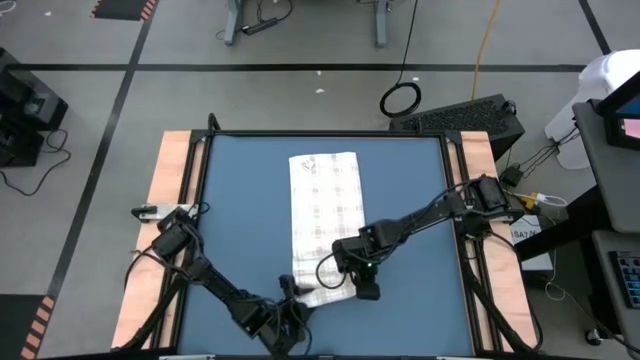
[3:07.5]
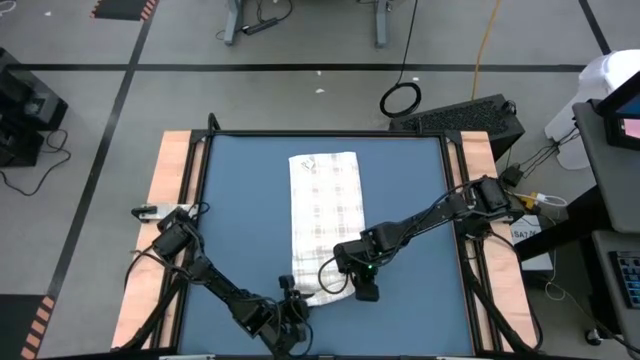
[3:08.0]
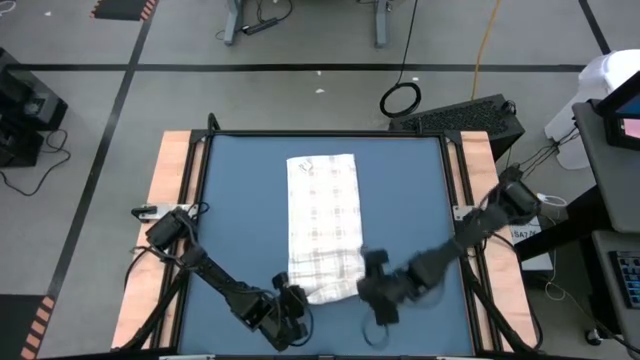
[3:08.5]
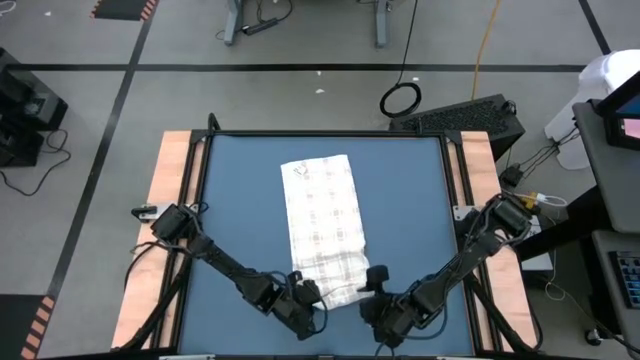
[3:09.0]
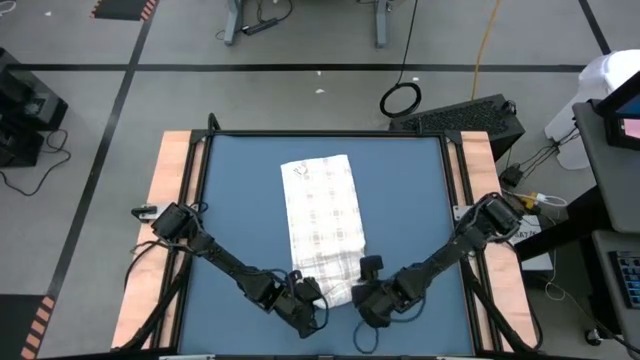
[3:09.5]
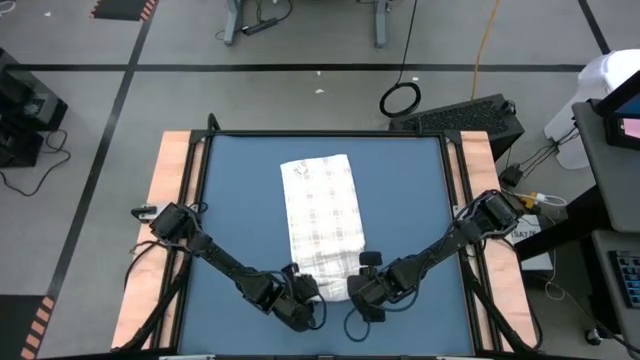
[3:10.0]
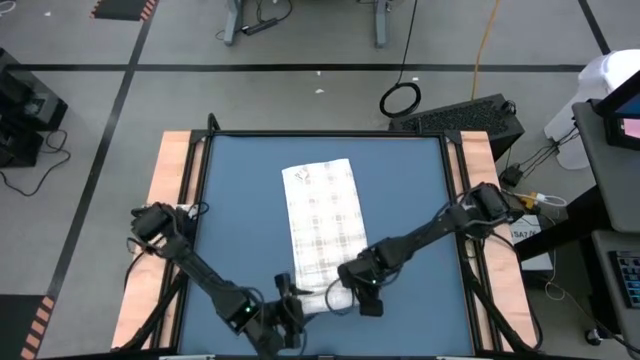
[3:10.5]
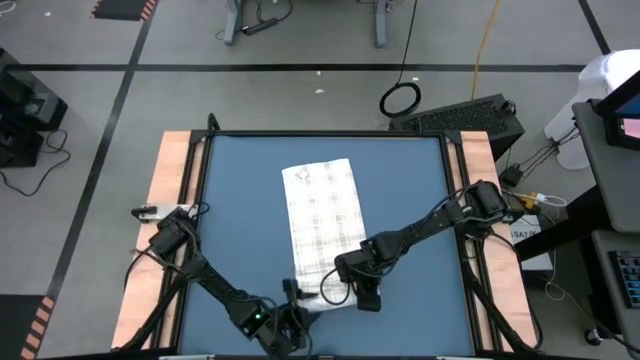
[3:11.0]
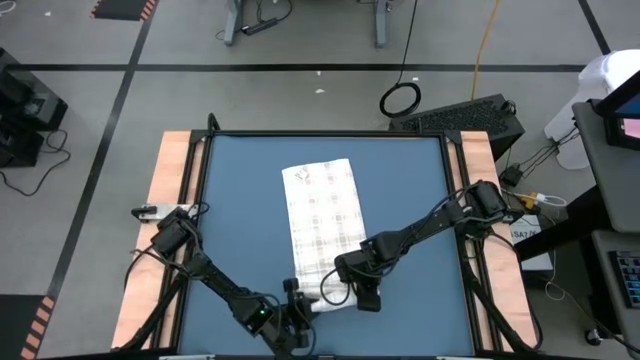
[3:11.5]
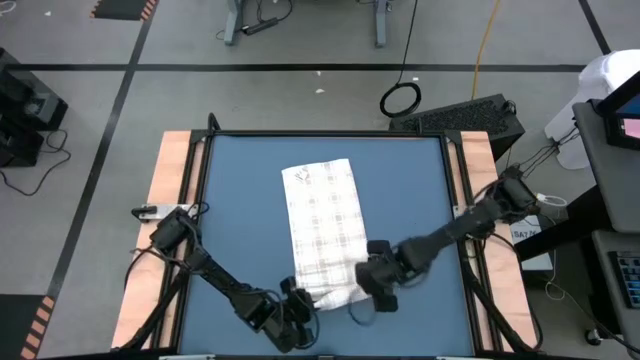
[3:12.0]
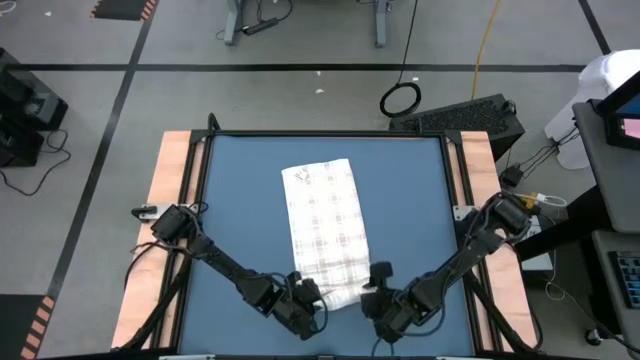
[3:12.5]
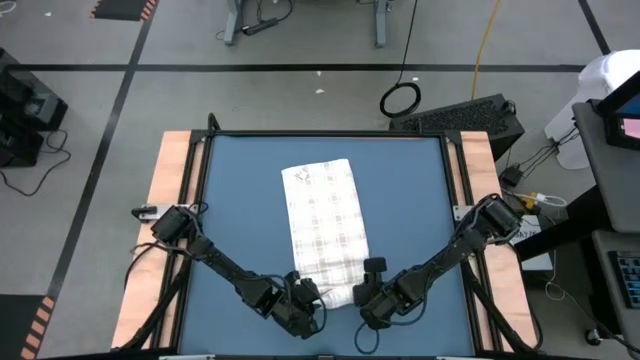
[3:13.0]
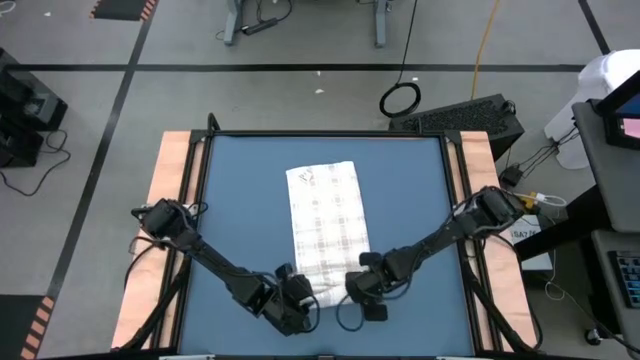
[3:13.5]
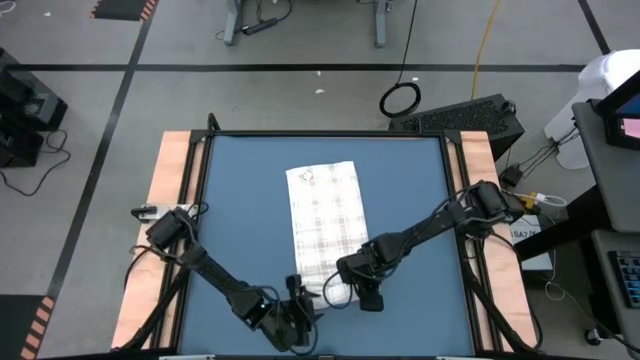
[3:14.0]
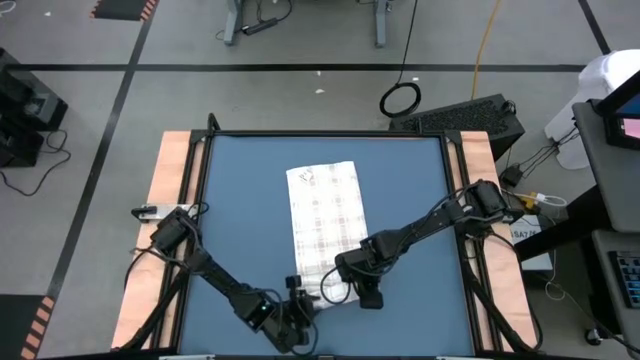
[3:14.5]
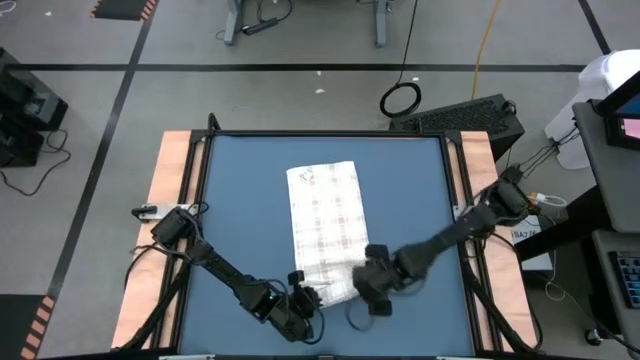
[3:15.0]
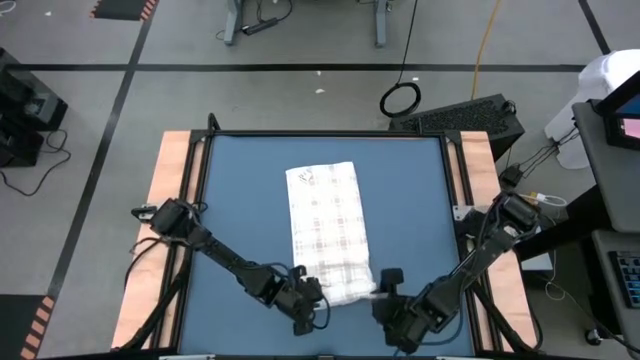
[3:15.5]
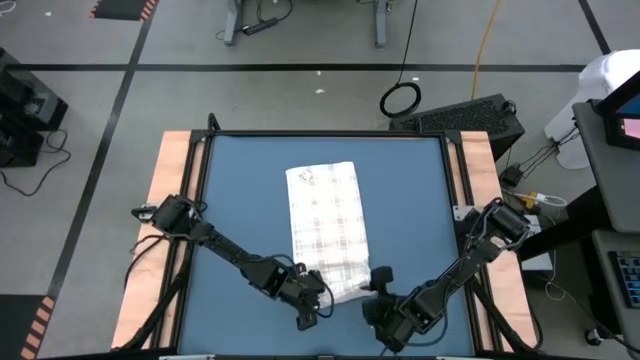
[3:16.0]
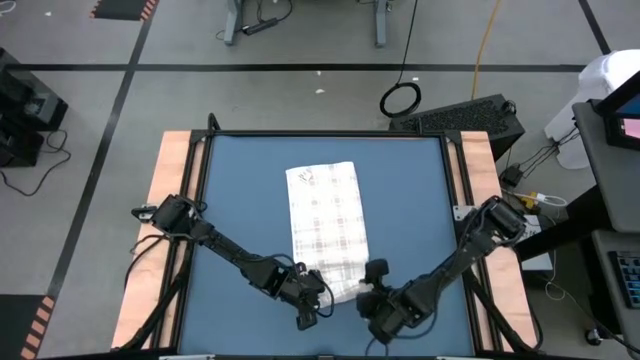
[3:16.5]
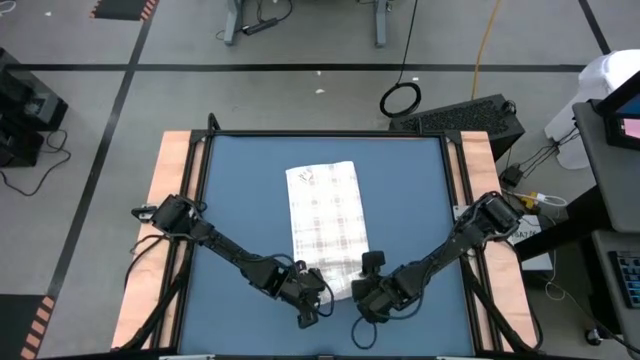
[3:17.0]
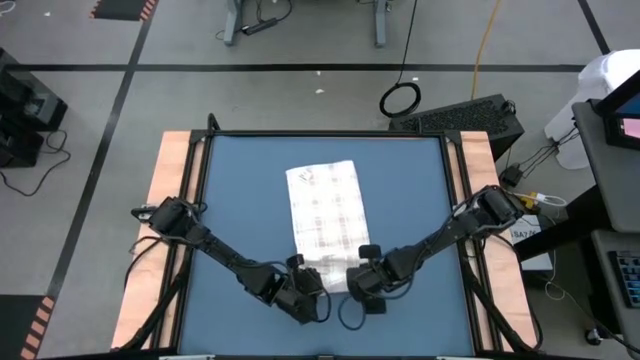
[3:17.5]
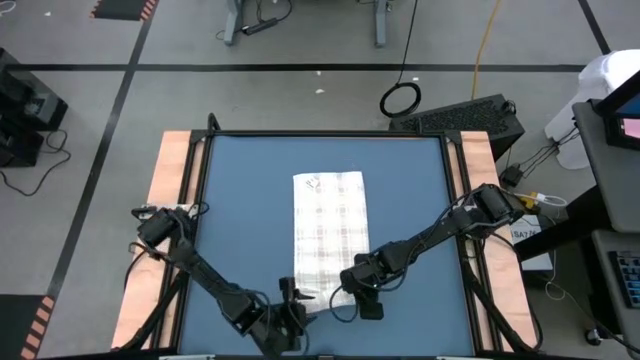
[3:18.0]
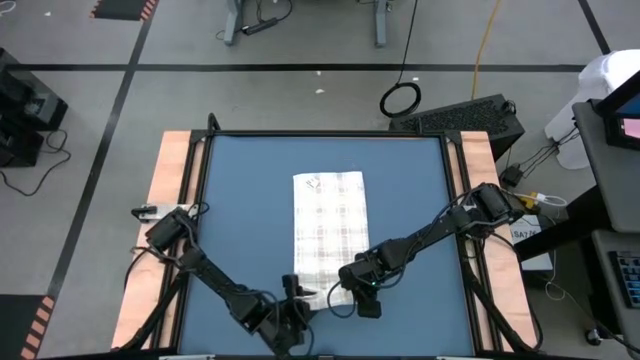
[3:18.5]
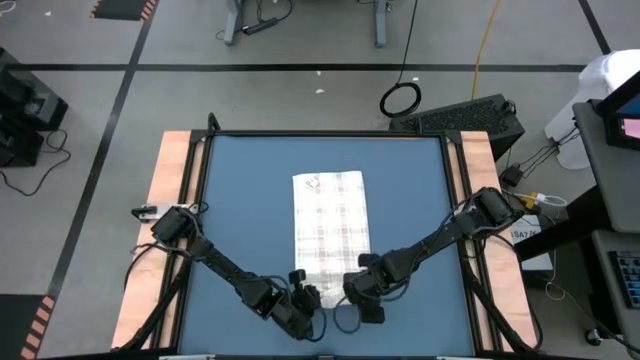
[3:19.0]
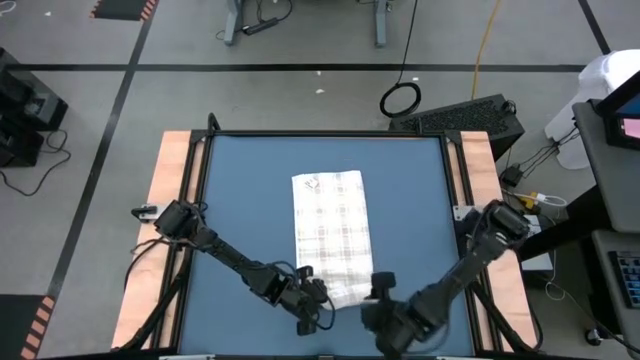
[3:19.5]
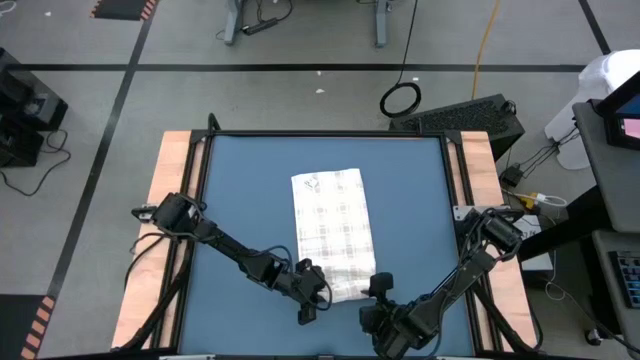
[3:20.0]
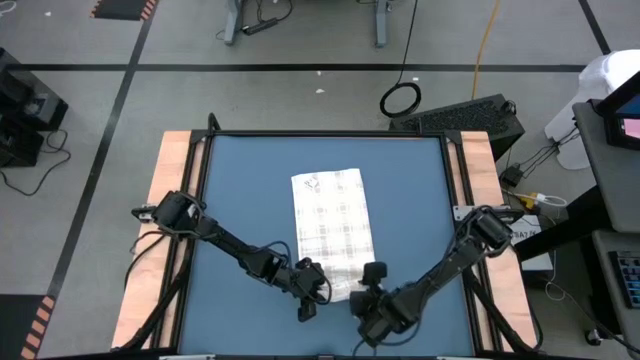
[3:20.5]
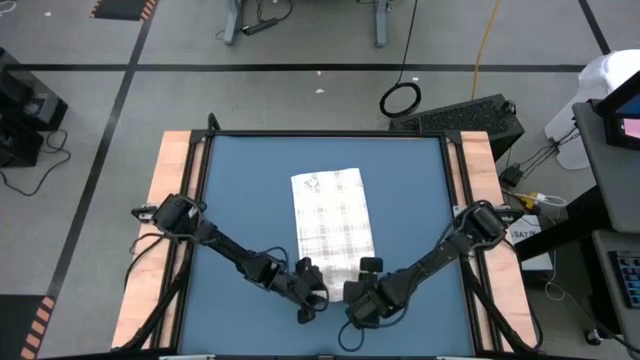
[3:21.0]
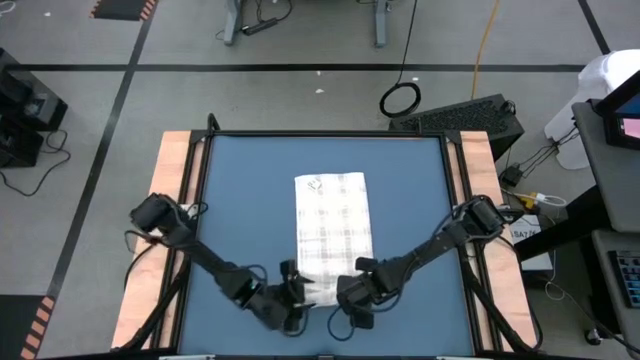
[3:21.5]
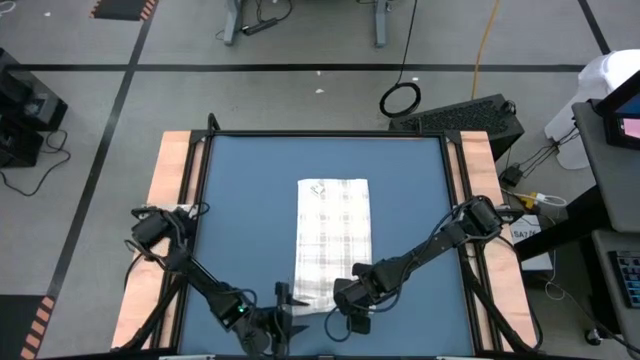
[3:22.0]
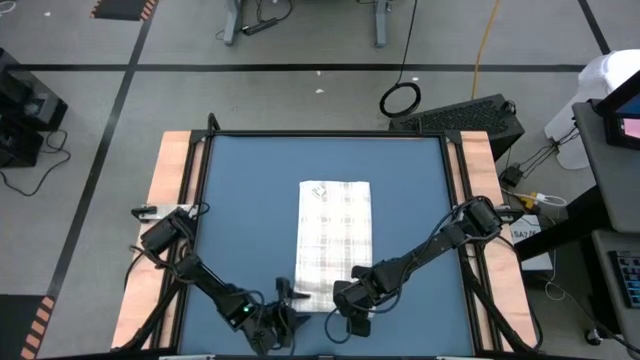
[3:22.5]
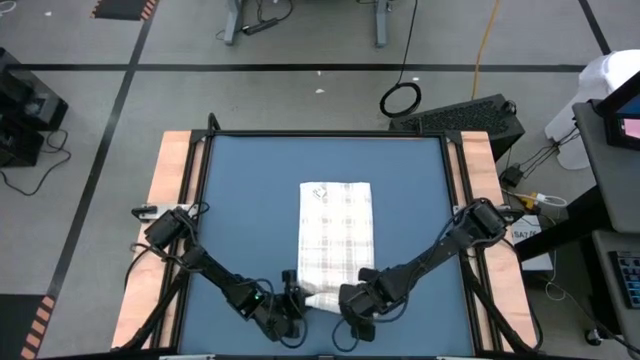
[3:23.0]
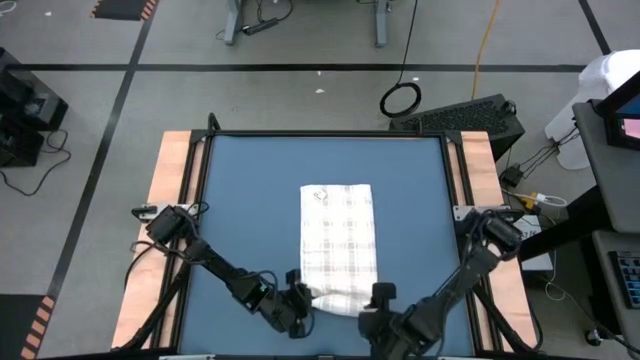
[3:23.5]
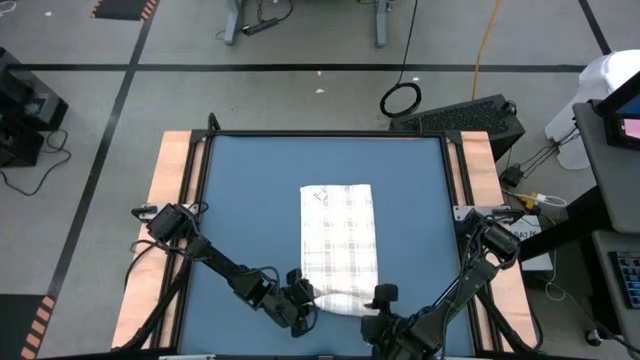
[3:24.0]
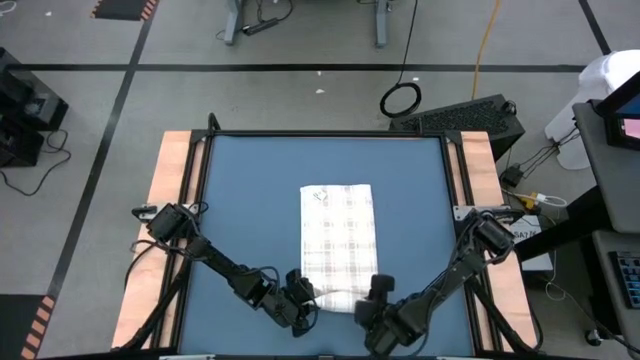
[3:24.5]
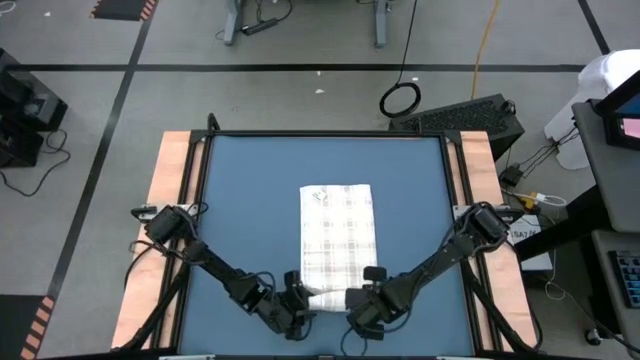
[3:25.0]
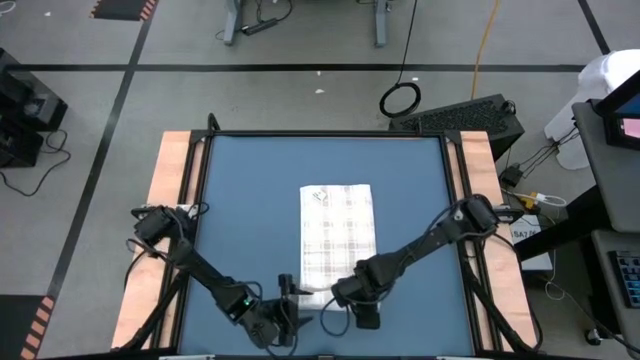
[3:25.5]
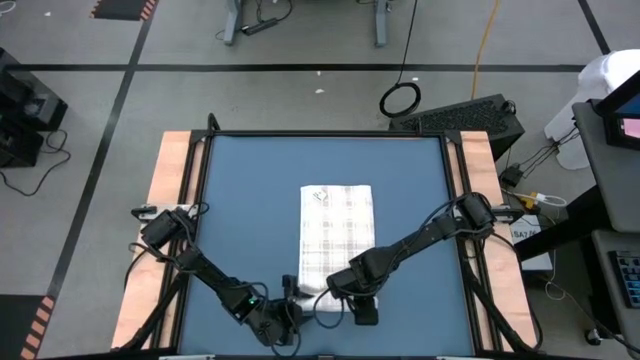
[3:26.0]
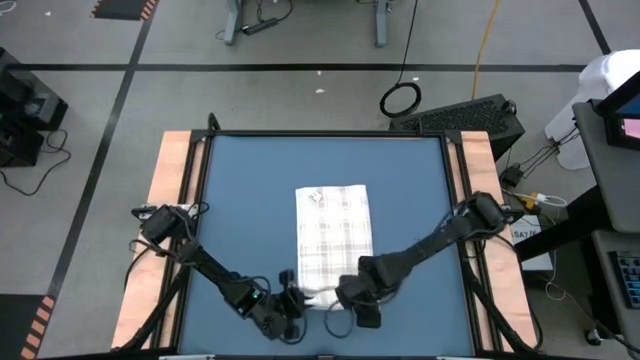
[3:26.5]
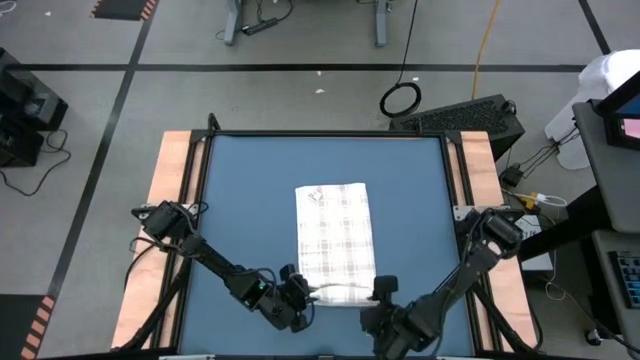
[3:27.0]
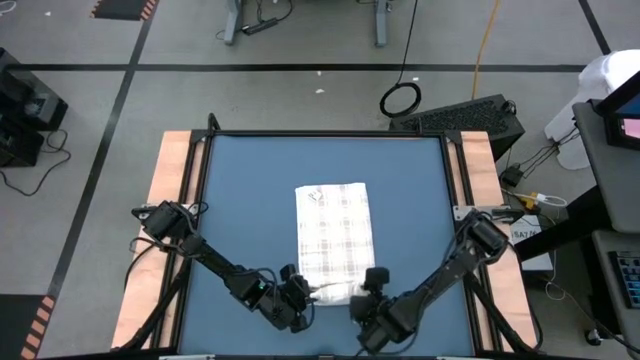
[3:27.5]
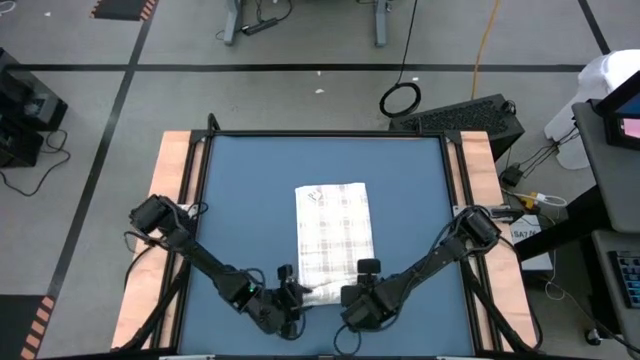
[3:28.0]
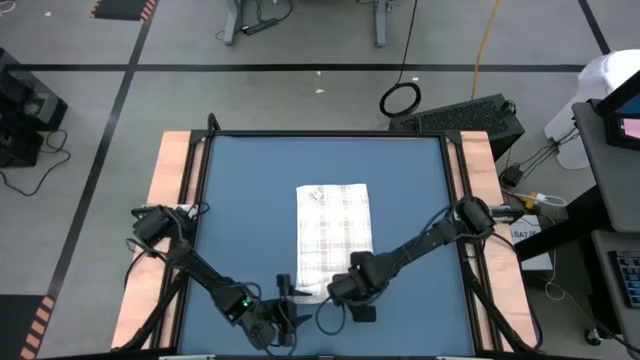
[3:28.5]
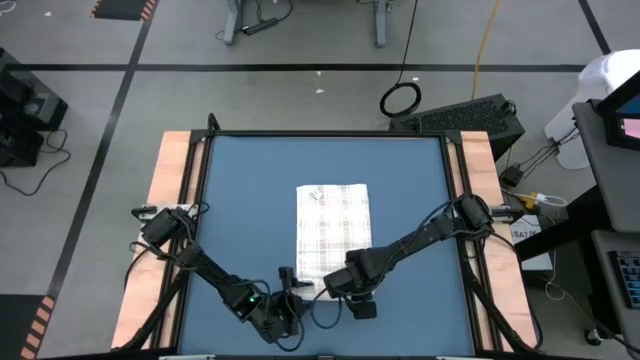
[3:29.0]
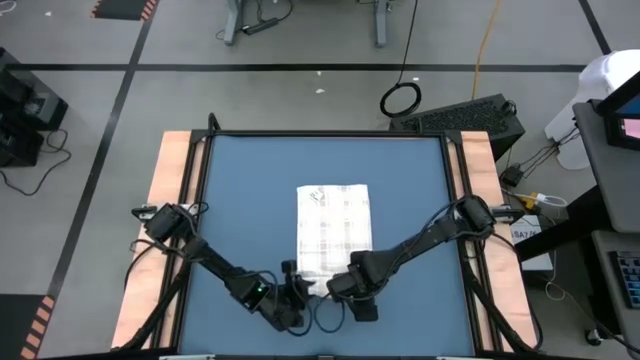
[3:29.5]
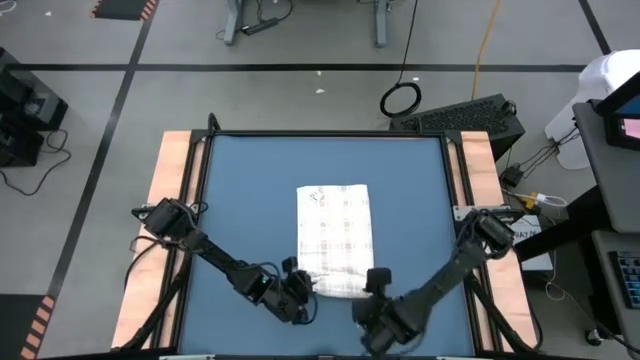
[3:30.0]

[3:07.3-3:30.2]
Task: Roll towel into tight, uniform cylinder
Roll the white towel
